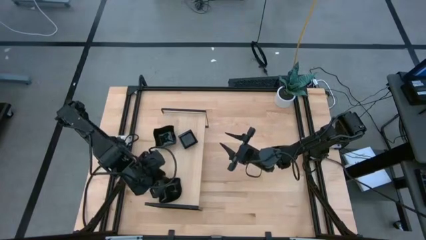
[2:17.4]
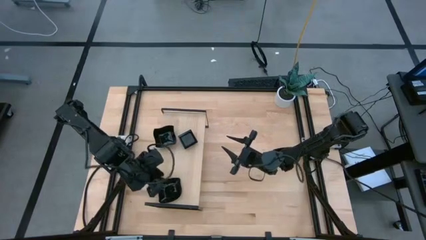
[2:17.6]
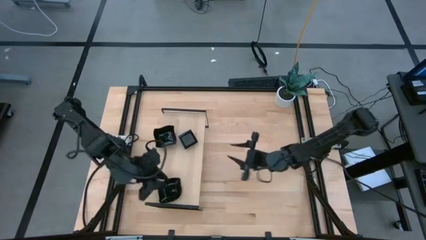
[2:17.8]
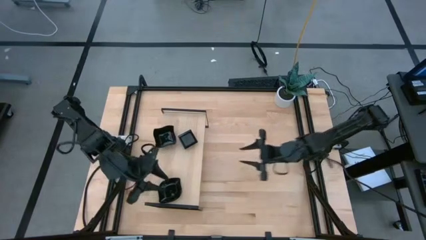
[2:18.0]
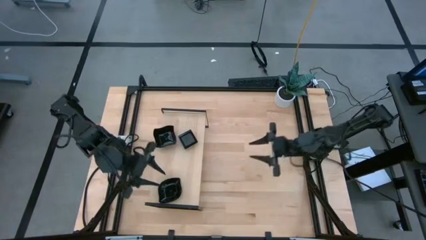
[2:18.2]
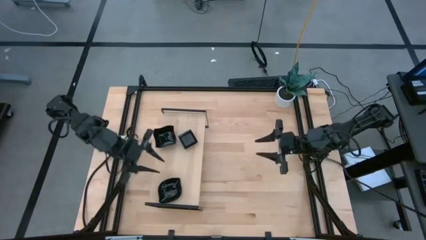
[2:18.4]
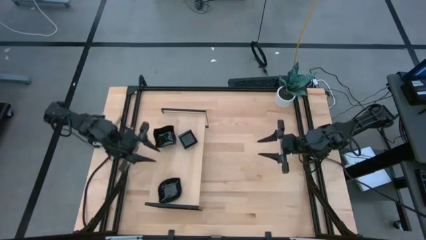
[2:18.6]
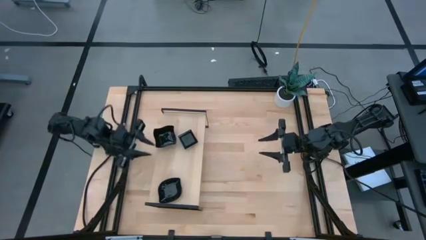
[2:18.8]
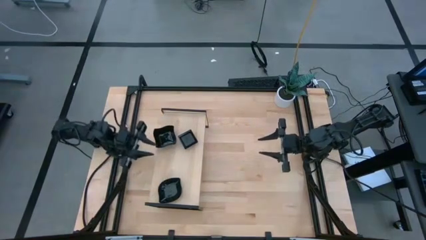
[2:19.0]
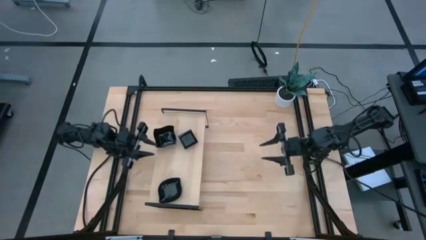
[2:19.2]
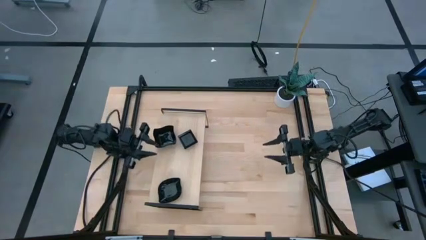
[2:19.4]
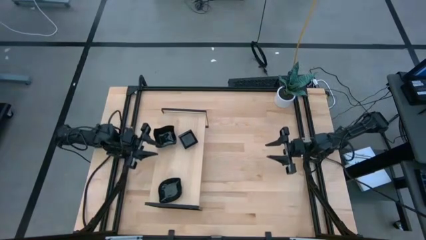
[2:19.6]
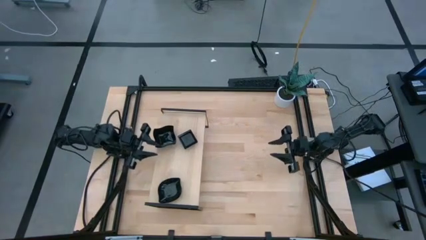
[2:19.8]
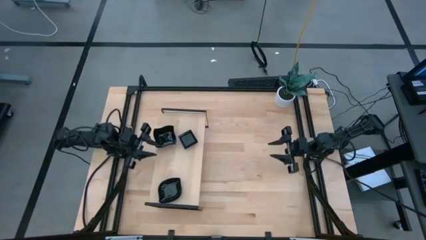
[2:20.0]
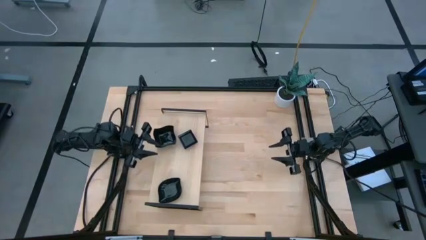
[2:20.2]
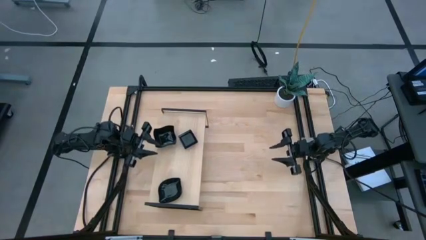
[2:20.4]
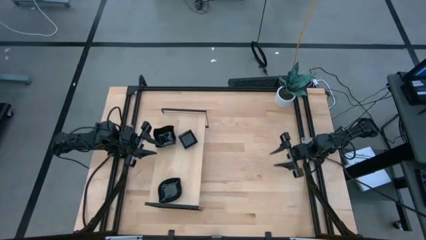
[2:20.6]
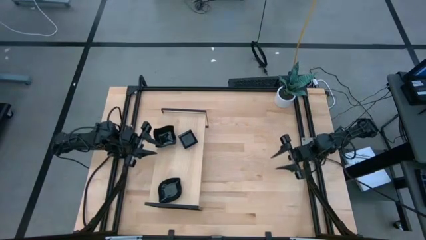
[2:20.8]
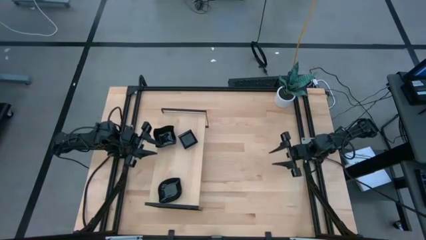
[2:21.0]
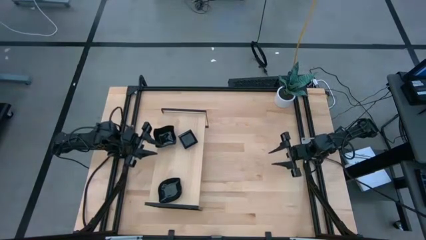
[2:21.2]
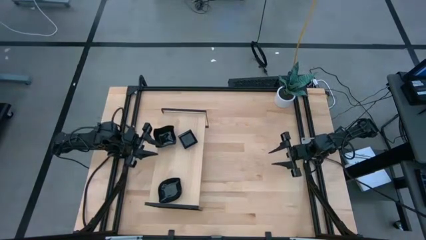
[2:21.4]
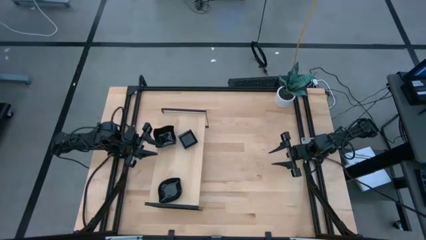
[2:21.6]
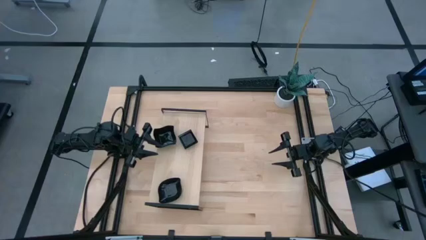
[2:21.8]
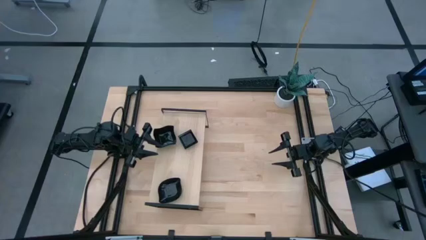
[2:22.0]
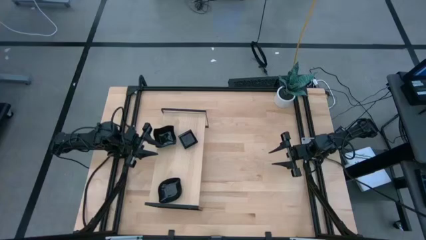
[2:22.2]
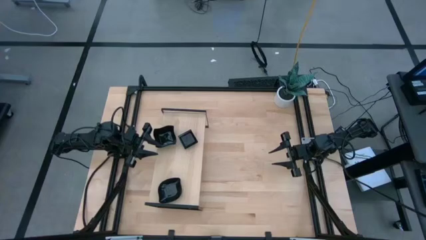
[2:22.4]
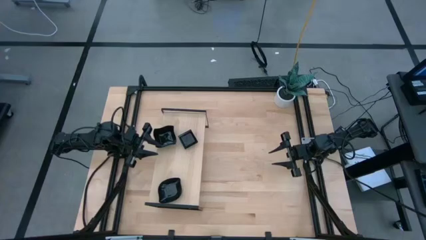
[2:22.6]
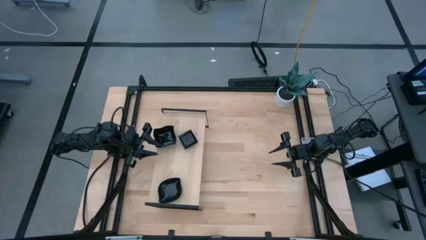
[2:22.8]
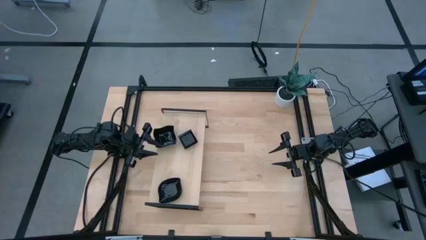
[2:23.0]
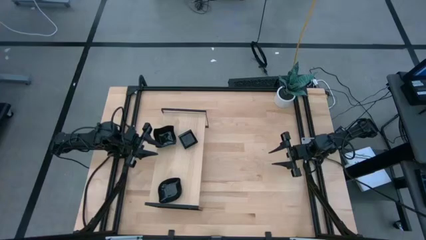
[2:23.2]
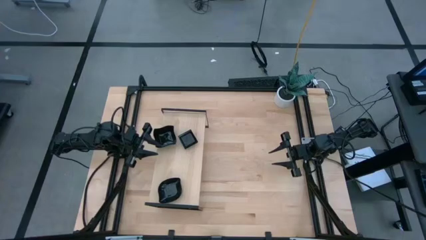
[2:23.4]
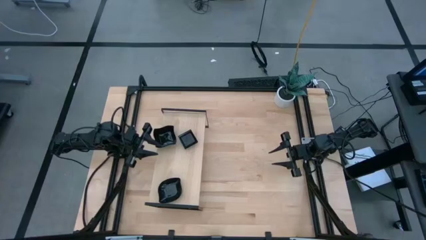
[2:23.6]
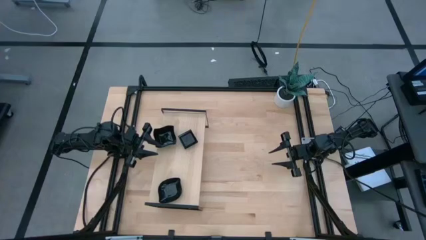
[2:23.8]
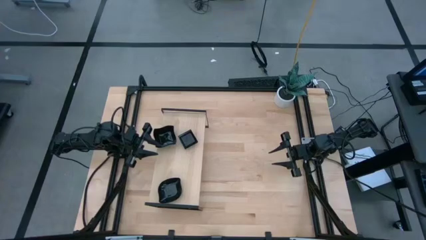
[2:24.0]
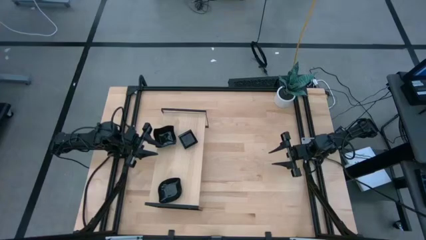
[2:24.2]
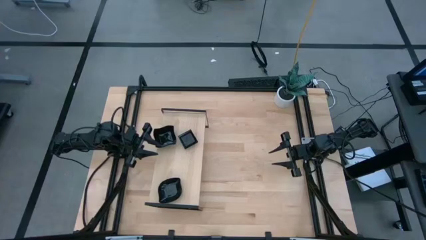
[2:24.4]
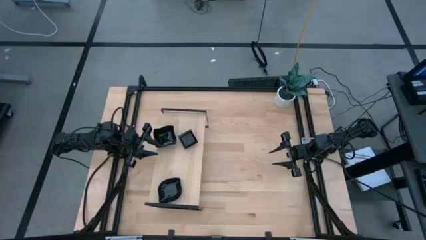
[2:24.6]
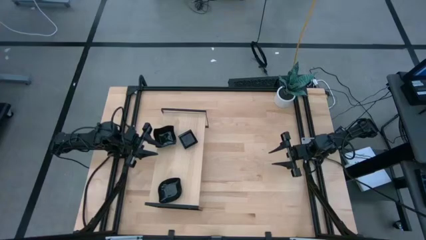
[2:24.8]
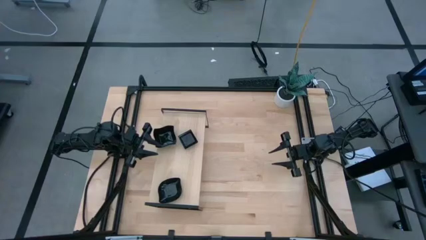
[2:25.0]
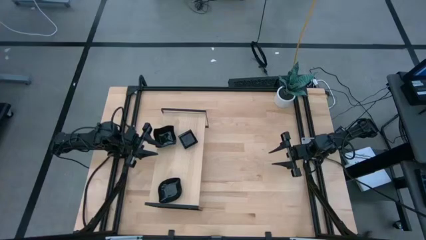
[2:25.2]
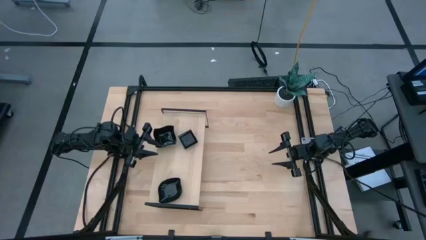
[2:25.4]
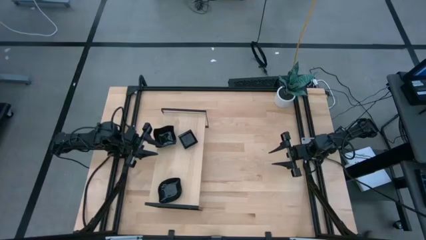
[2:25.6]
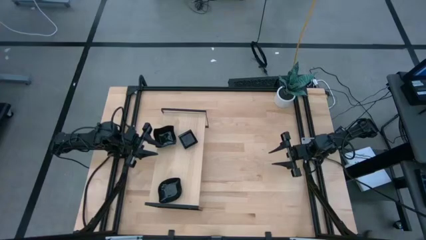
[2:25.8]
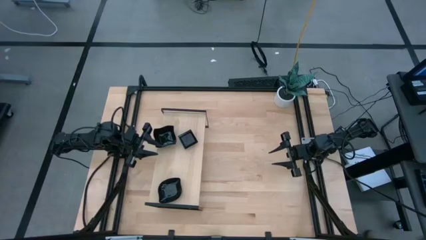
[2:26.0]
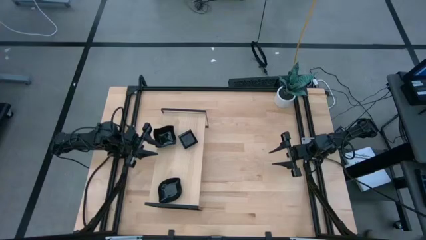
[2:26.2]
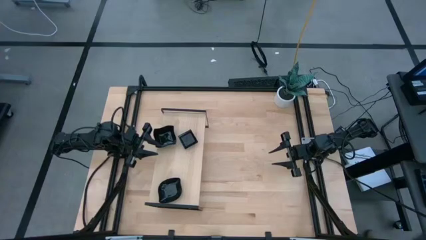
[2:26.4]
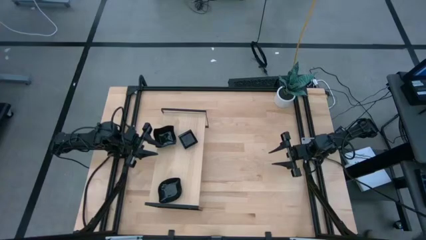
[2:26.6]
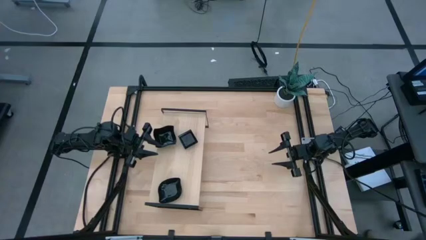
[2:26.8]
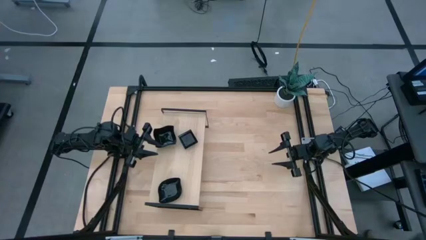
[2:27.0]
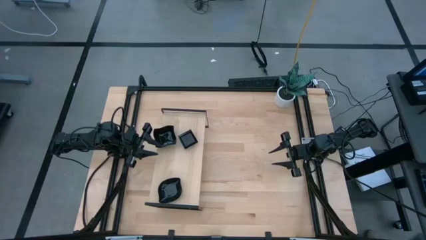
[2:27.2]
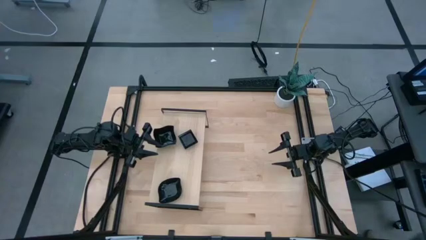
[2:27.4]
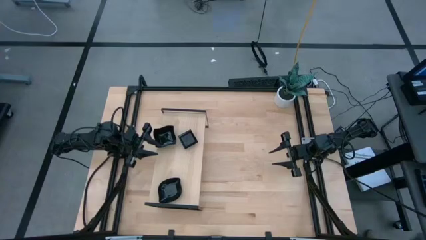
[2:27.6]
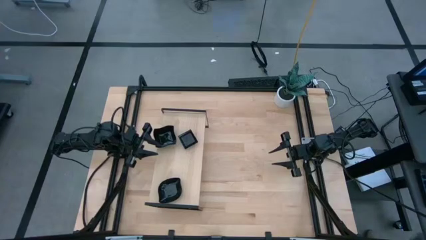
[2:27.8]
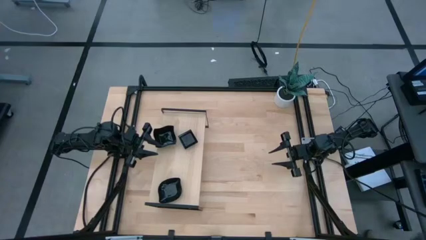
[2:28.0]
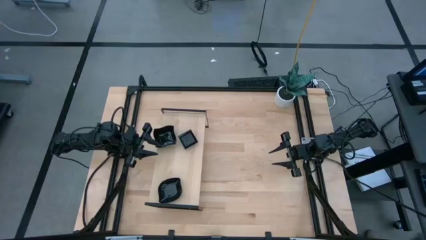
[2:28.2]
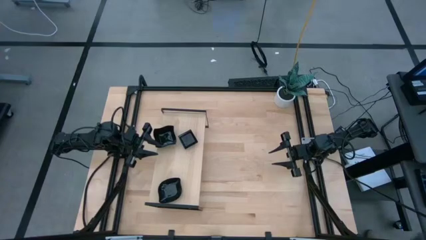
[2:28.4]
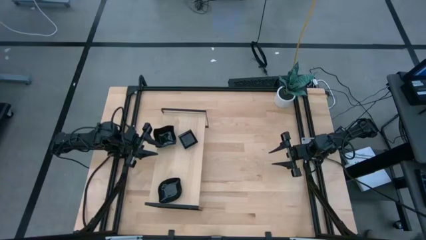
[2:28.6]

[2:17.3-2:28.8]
Task: Pick & Place Mini shaped plates
Return to Home Position
